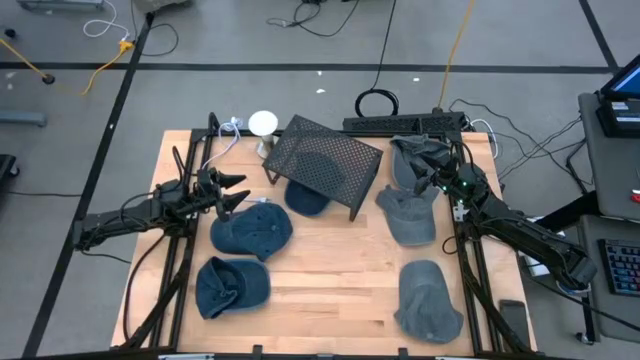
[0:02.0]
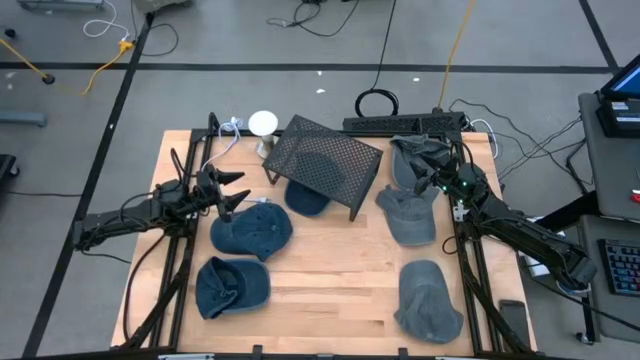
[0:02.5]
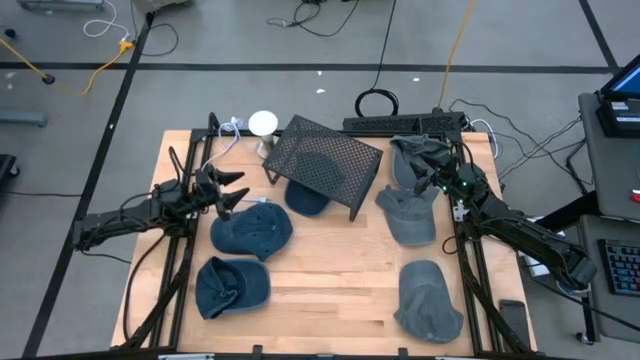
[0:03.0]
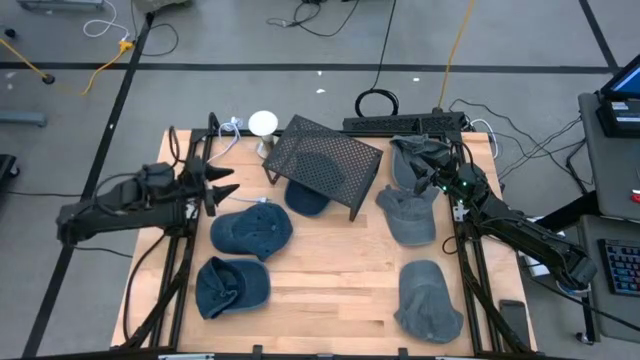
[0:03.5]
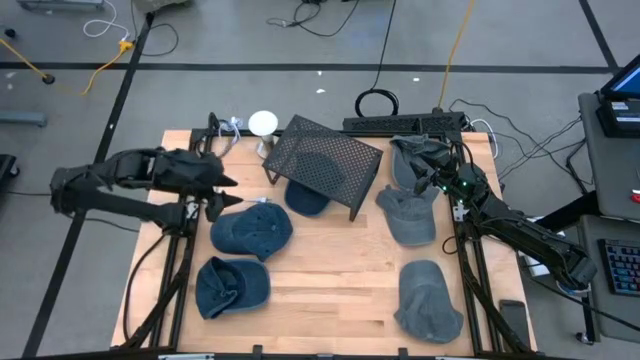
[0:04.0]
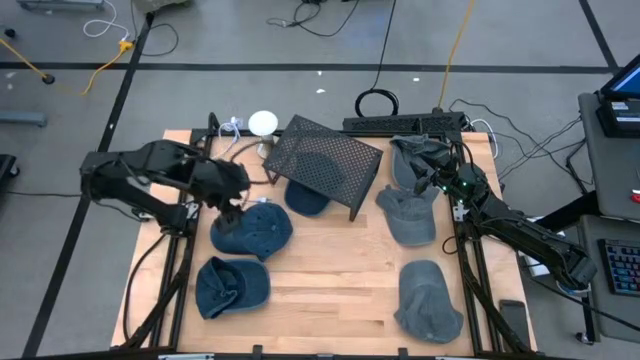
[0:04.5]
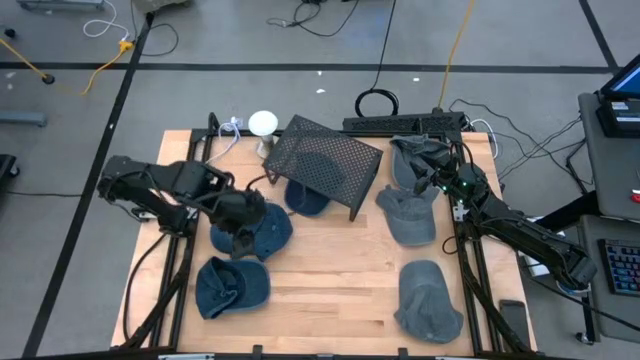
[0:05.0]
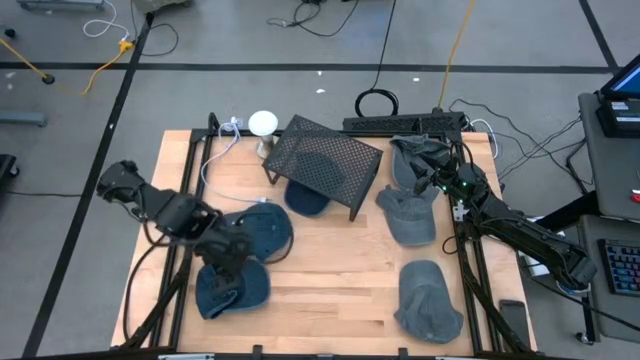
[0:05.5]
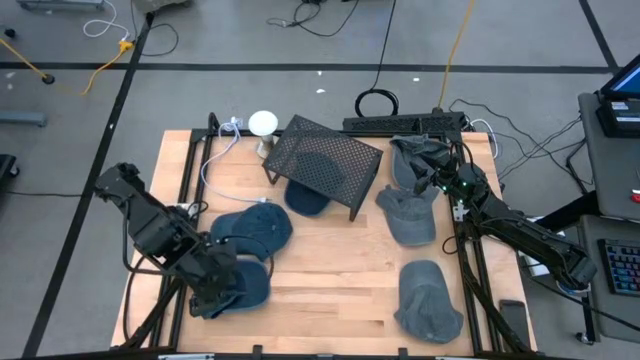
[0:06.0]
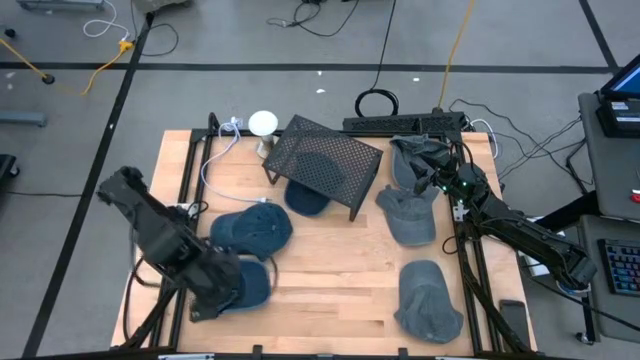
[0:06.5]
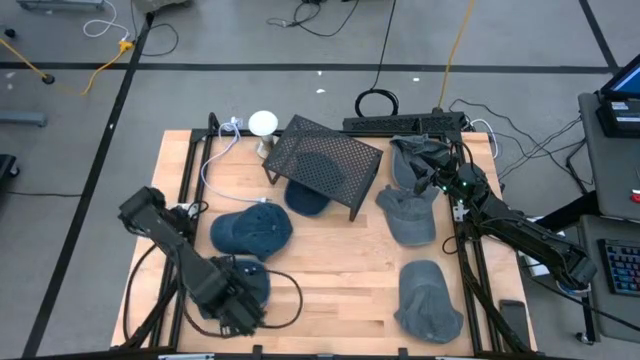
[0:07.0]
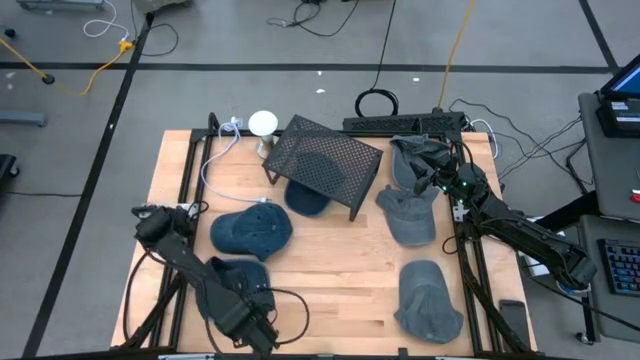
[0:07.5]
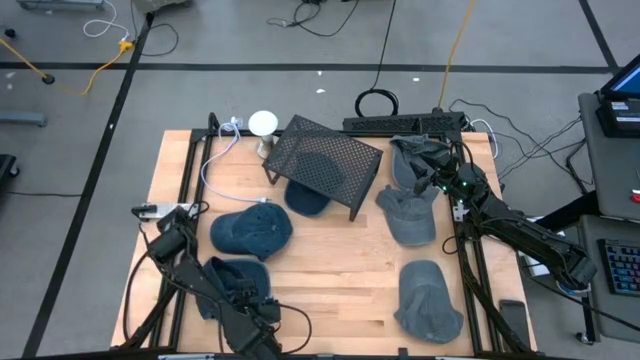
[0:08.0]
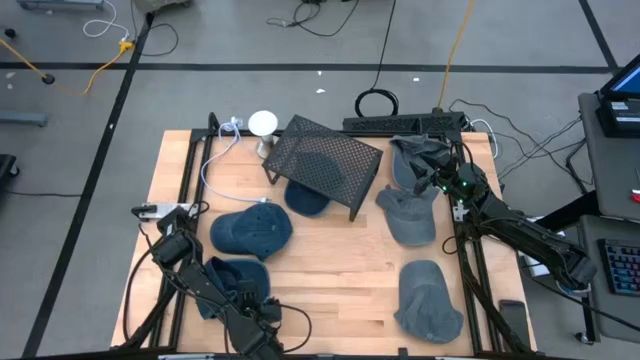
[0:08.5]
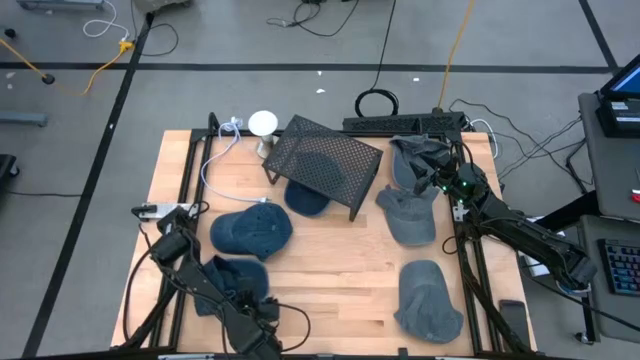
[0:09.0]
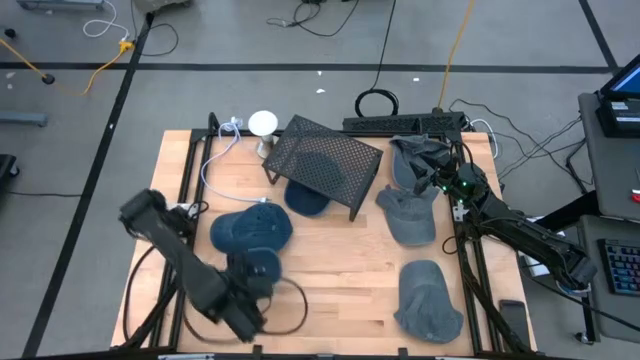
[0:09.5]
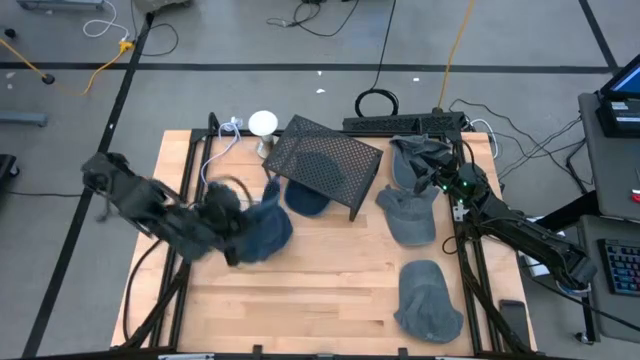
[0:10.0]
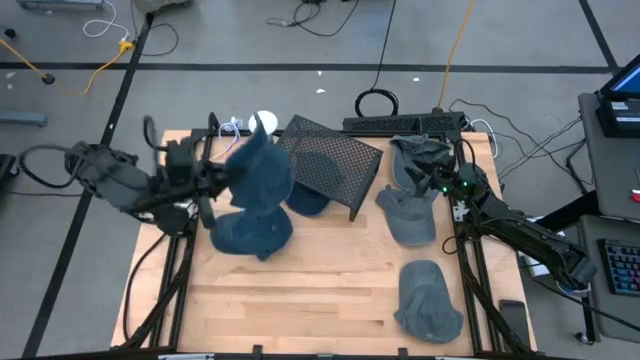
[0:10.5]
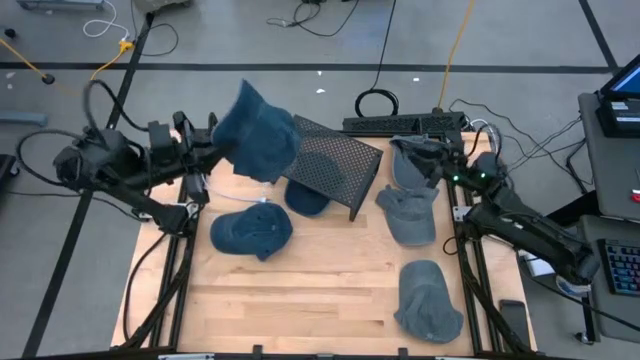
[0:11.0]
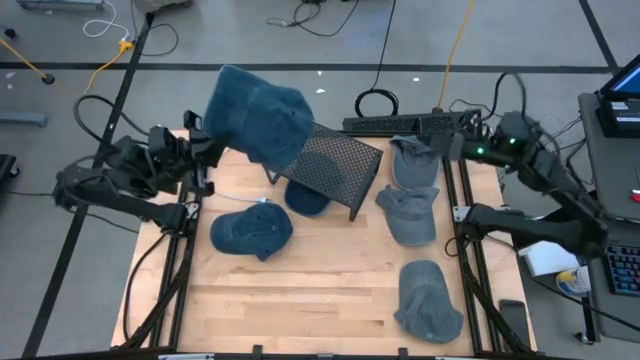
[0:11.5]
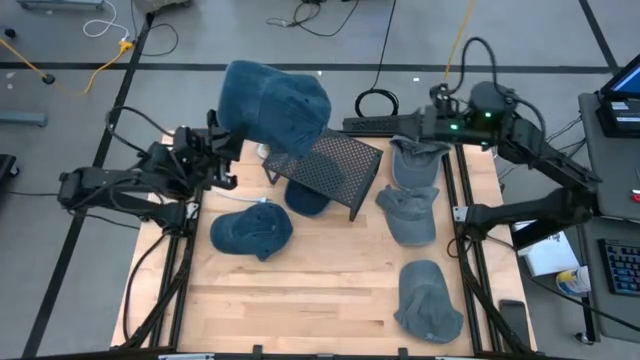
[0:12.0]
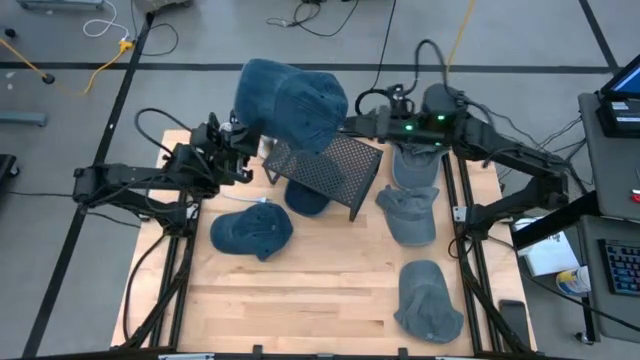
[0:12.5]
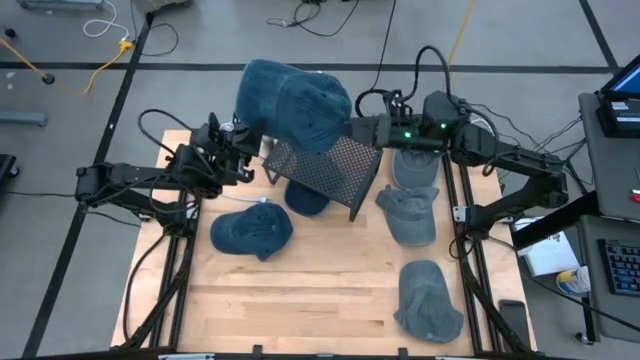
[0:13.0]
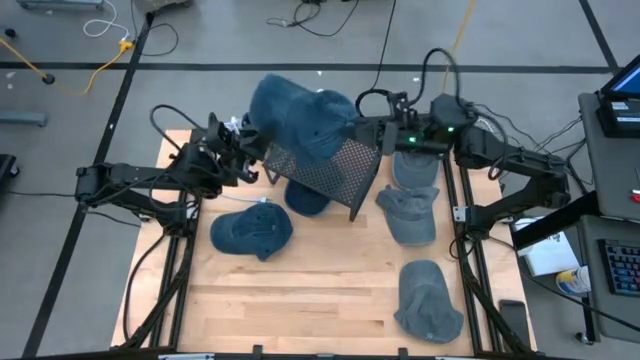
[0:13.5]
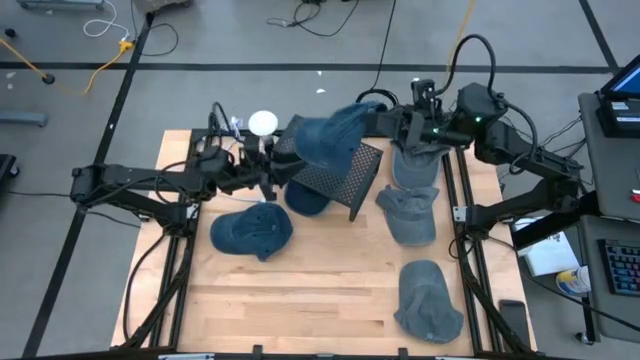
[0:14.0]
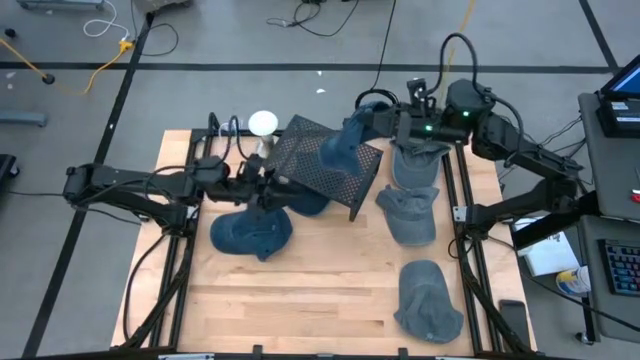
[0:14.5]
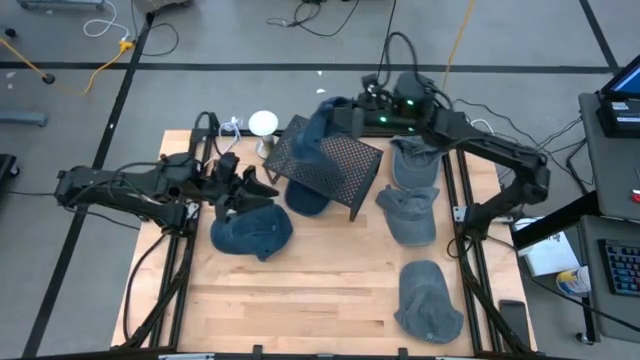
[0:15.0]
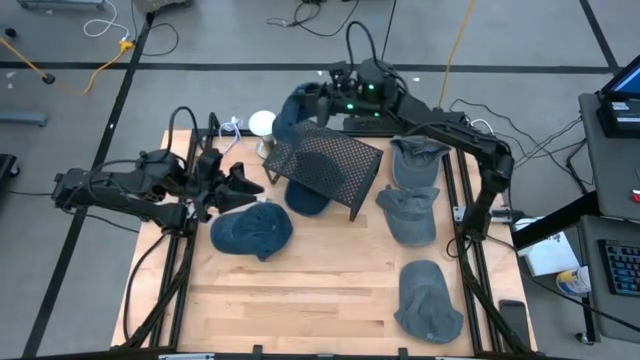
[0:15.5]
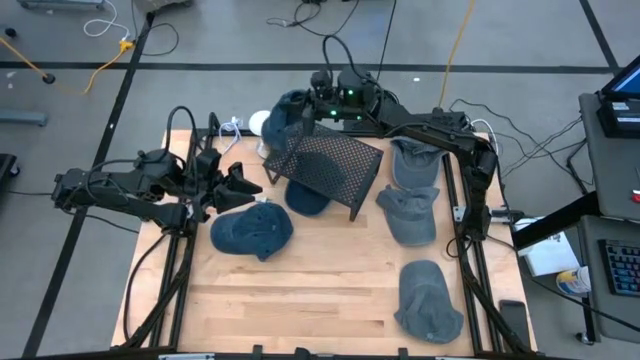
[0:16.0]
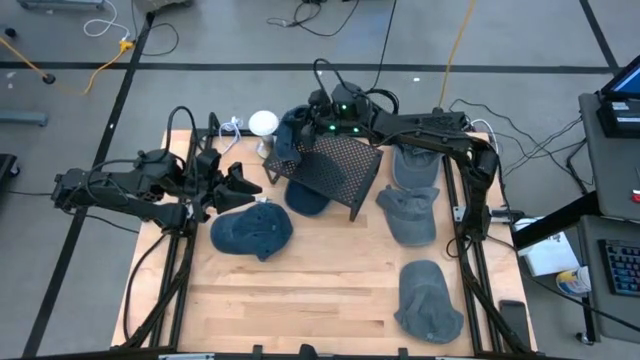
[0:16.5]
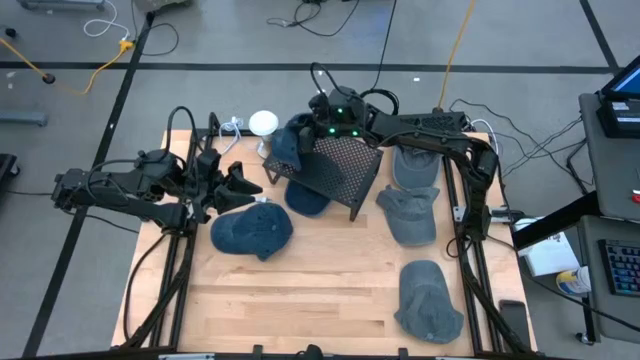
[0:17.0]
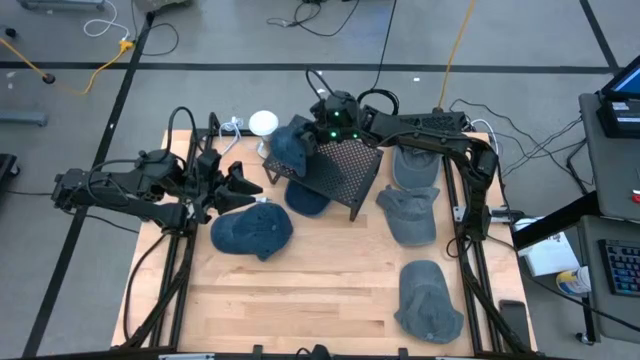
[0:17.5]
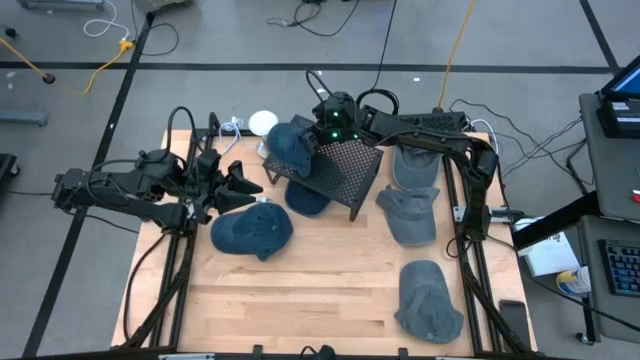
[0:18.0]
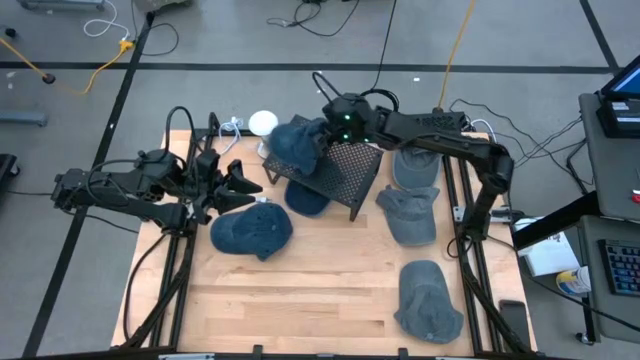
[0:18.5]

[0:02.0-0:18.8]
Task: Pick & Place hat
Put the bottom blue cap on the shelf
